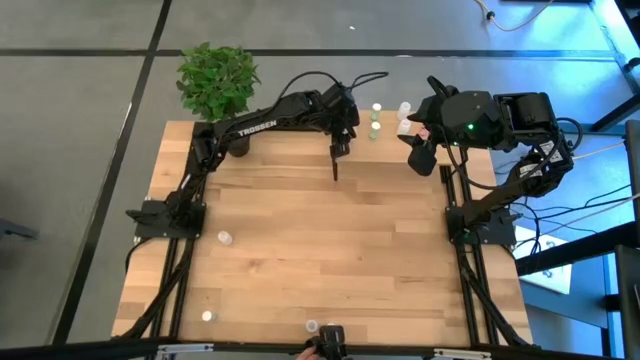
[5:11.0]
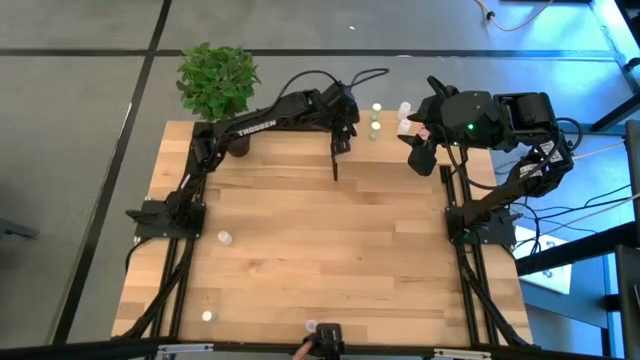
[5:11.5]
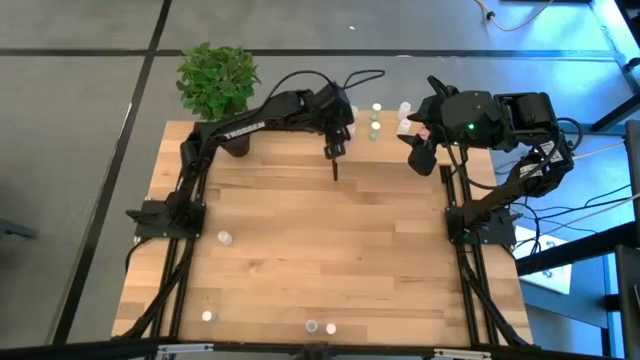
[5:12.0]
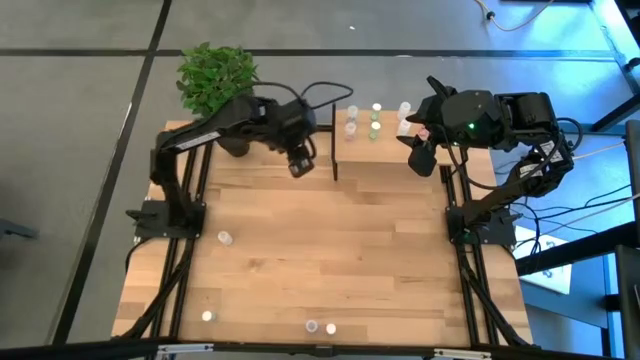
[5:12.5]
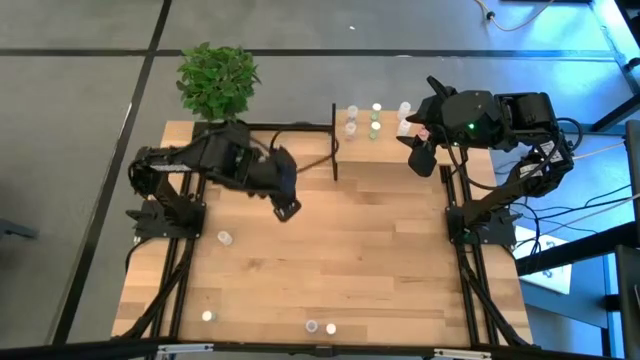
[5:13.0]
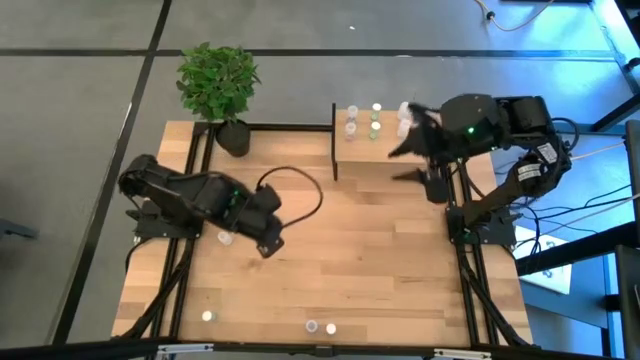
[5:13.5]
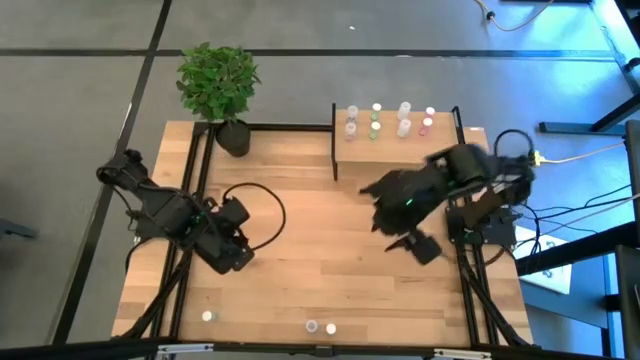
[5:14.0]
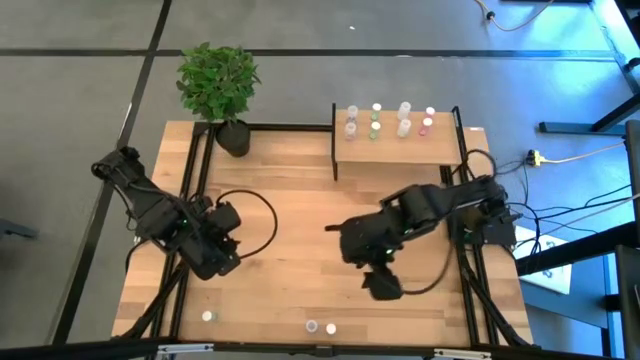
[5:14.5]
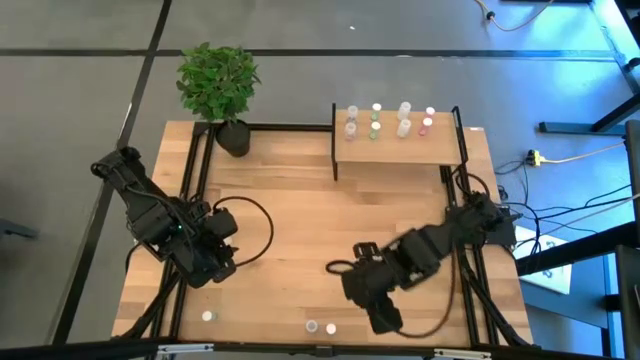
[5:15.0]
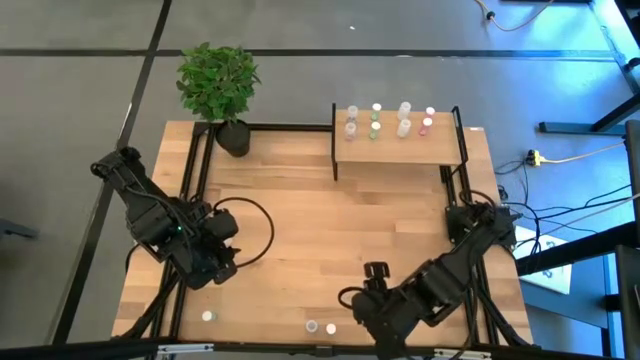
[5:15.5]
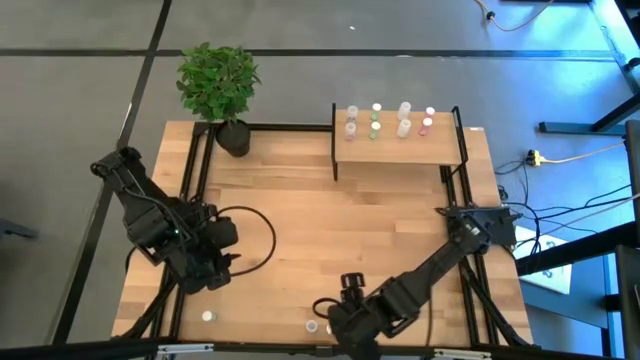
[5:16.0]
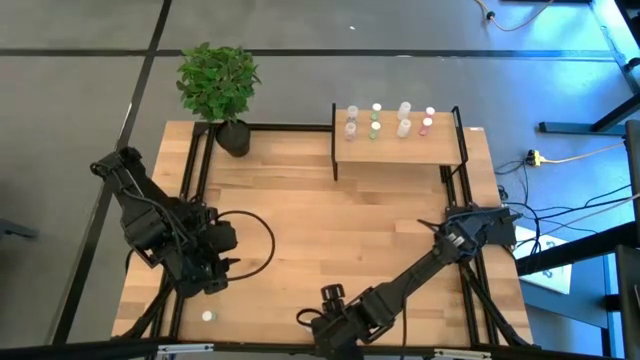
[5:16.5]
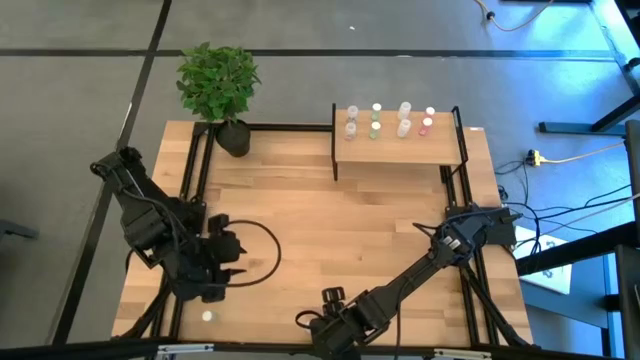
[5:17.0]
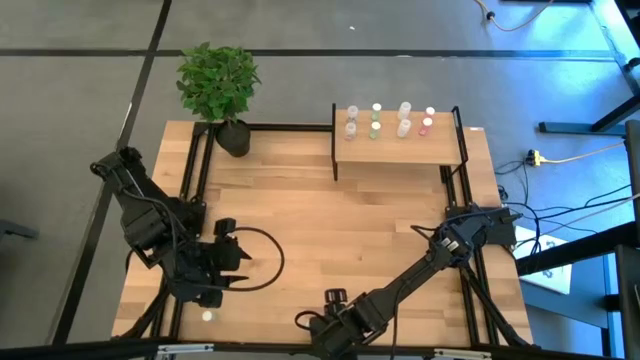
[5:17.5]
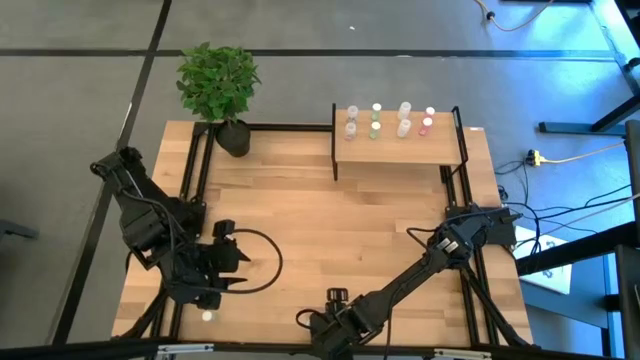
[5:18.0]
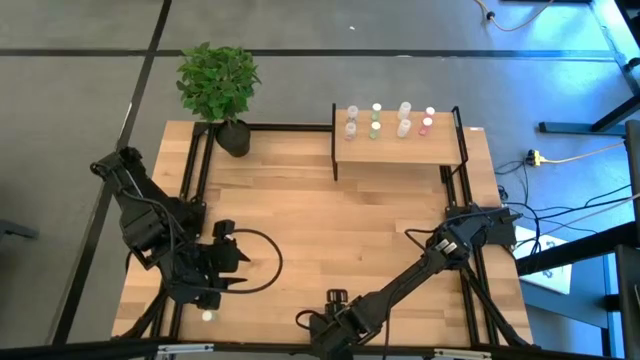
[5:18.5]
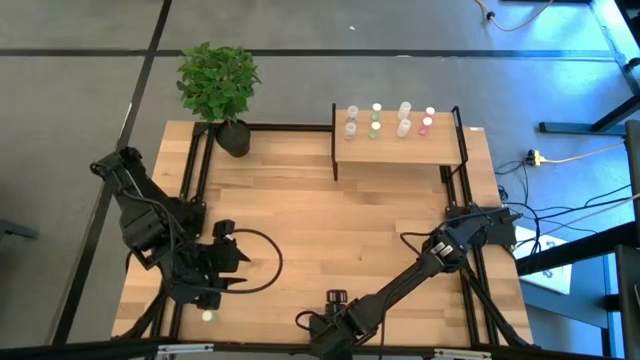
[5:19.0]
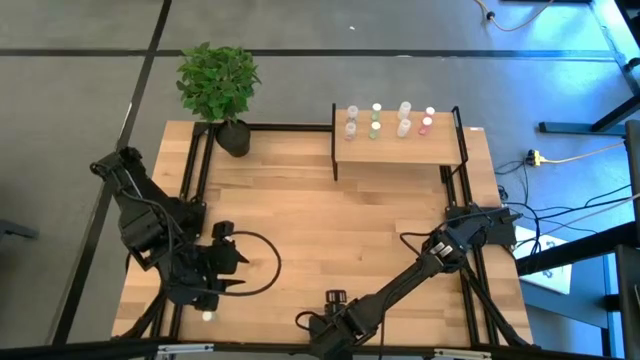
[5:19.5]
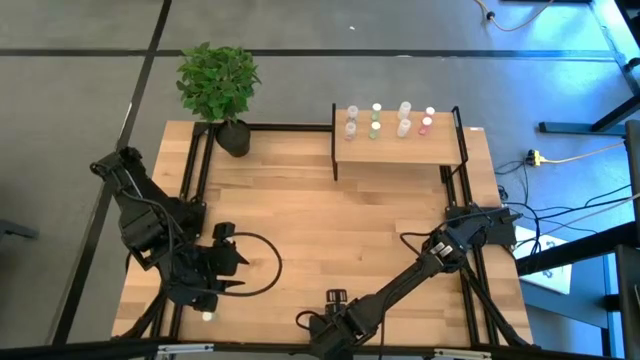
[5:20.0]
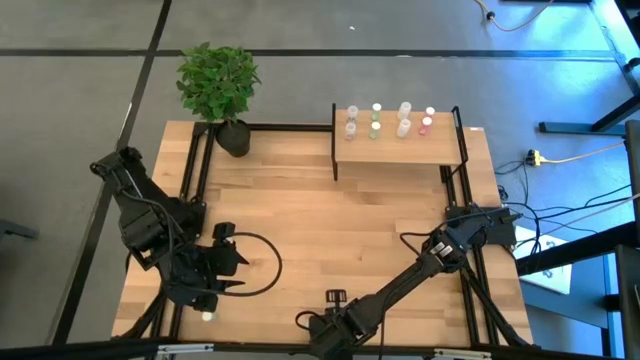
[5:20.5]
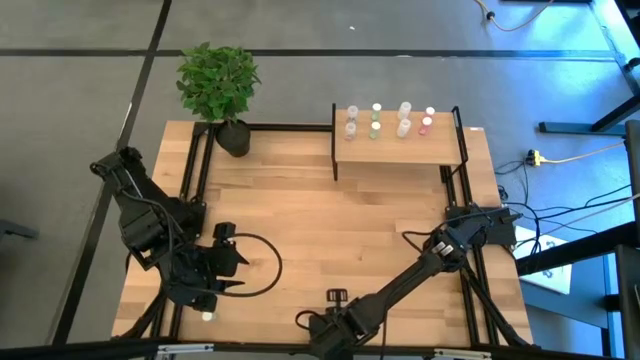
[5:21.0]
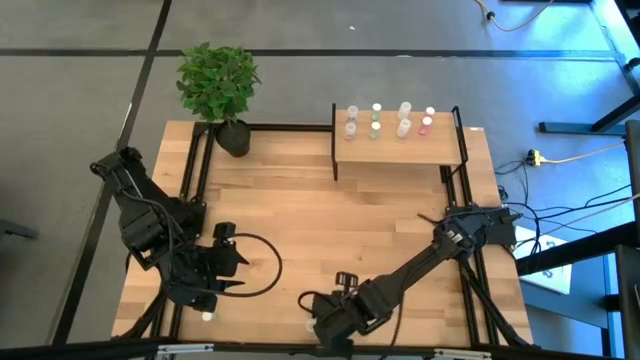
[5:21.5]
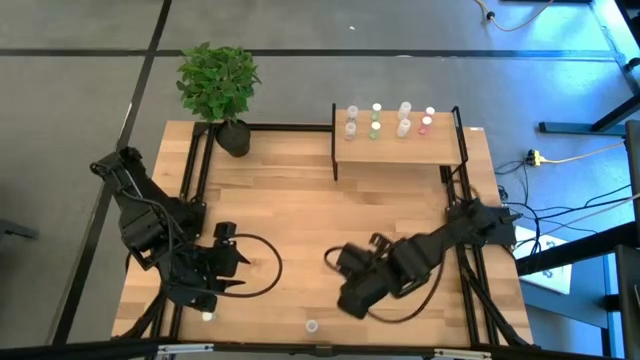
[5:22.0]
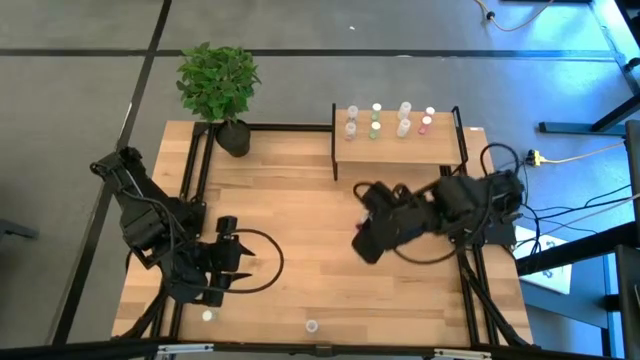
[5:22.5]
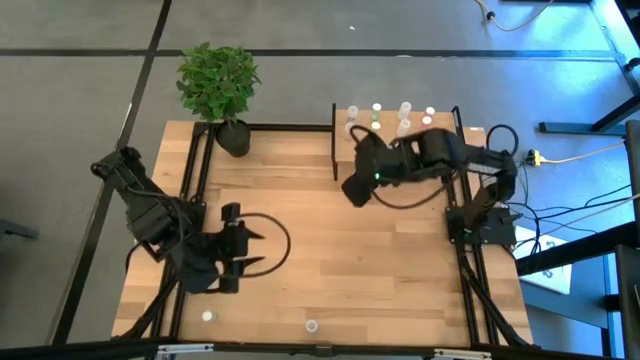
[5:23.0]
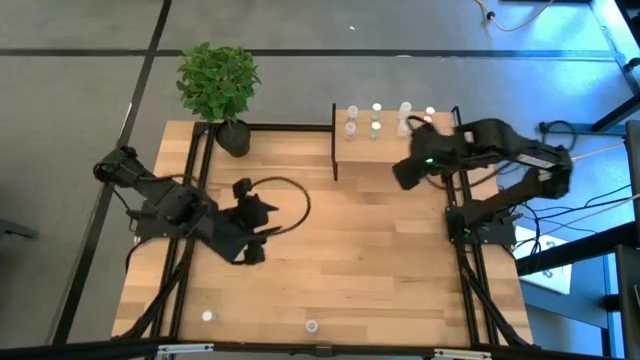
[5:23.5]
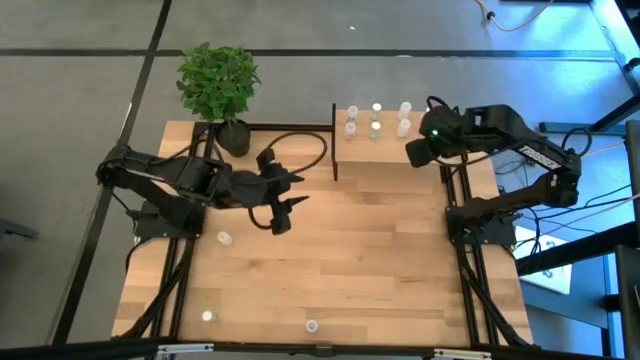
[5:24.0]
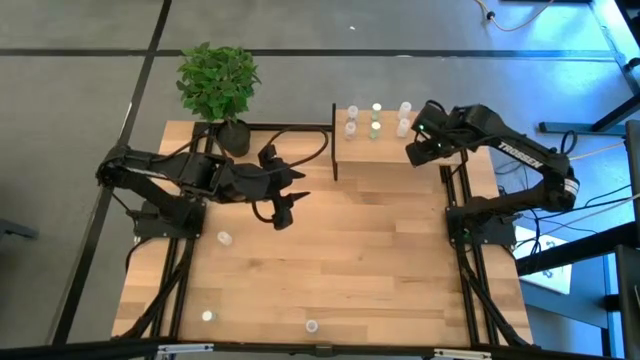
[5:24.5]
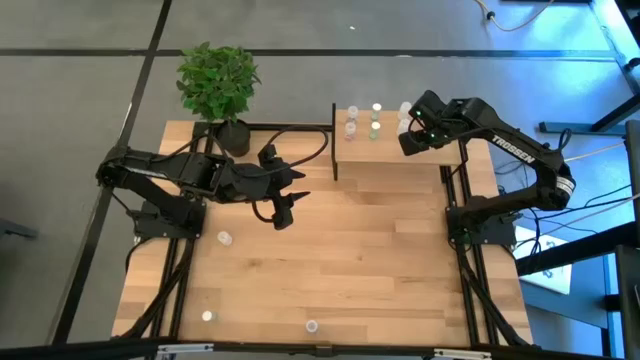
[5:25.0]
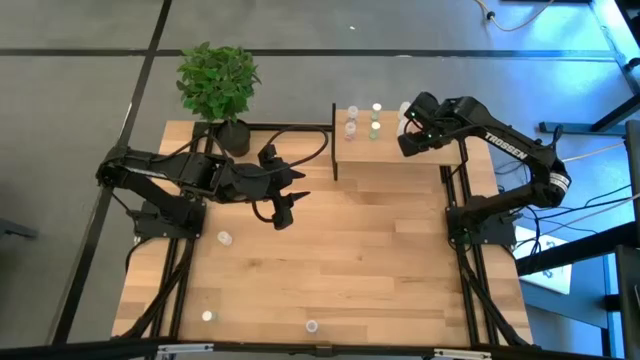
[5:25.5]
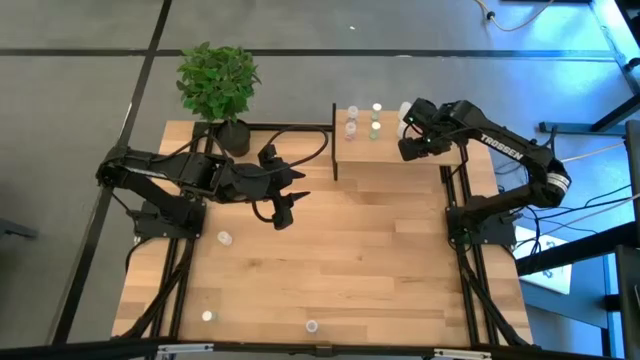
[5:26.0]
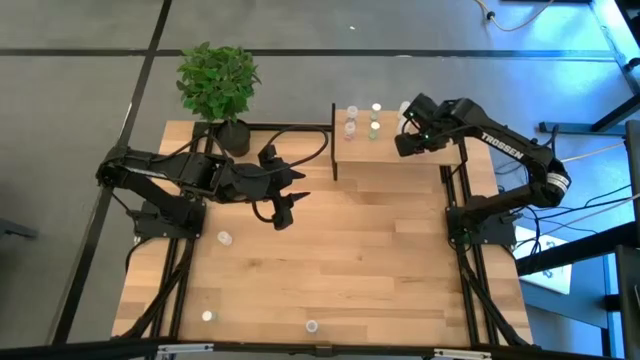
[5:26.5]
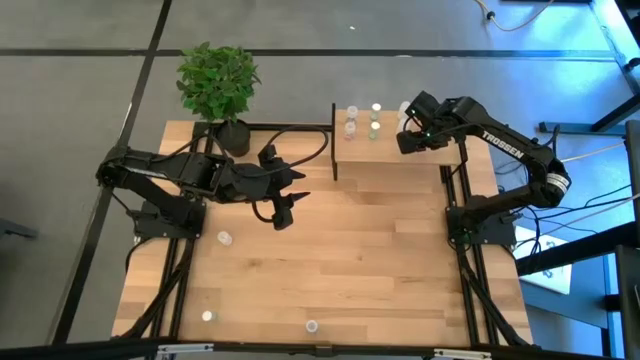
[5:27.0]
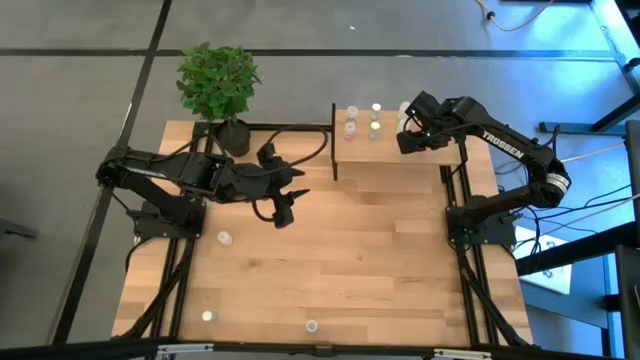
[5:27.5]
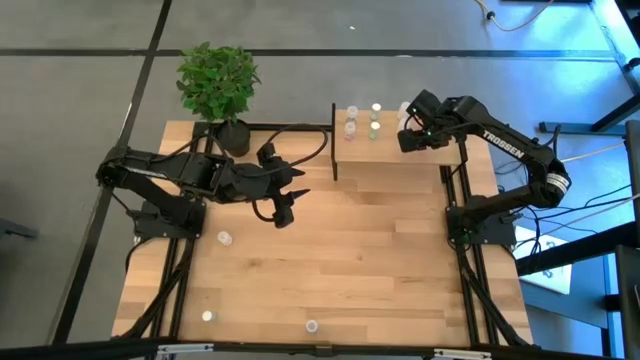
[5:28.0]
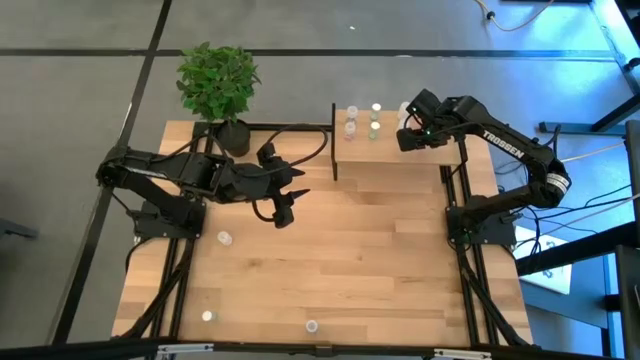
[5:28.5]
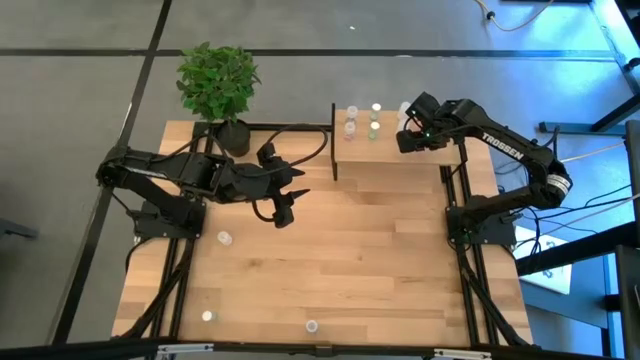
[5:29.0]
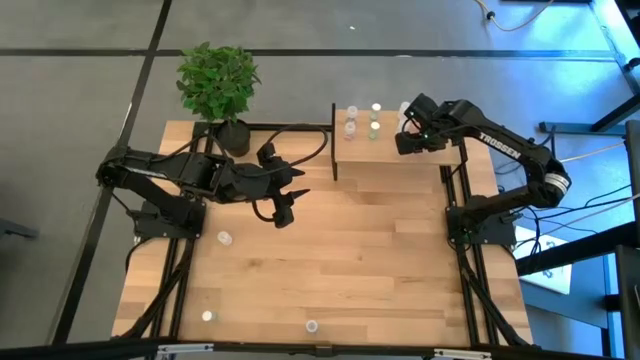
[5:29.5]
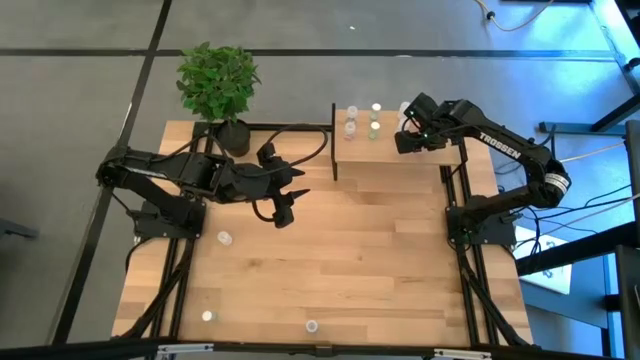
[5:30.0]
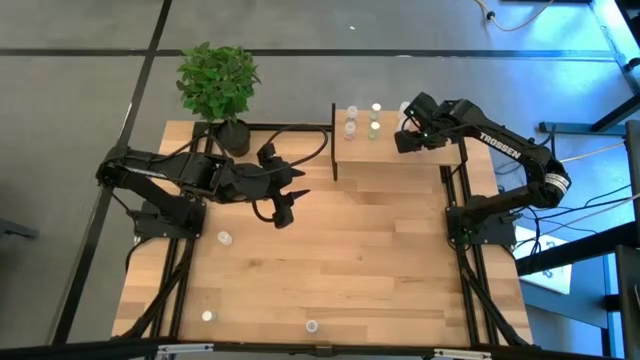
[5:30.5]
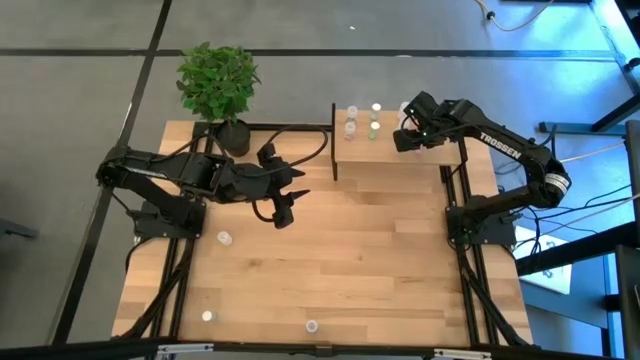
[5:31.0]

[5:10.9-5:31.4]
Task: Pick and place medicine bottles onto shelf by color
Put the pink pill bottle aligned with the other pink pill bottles on the shelf
